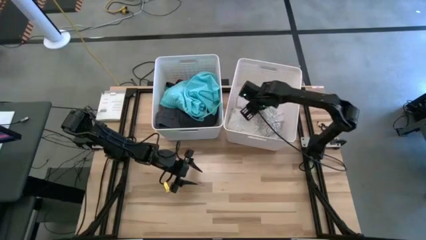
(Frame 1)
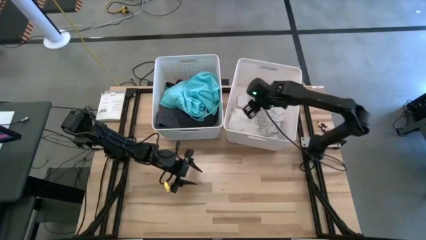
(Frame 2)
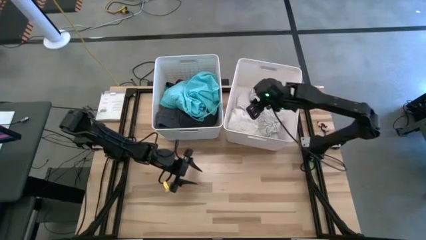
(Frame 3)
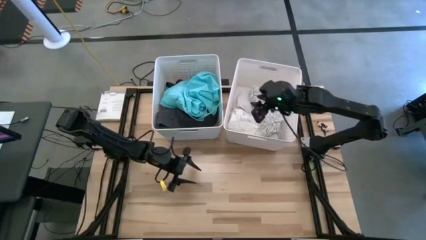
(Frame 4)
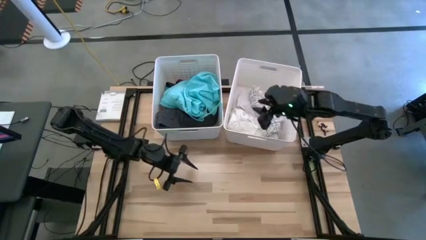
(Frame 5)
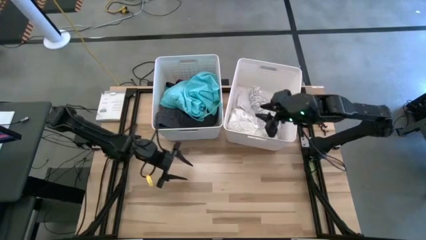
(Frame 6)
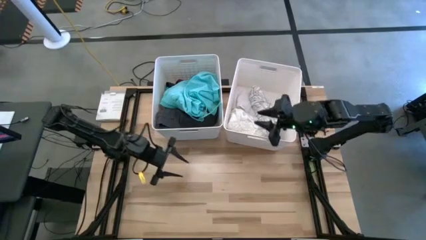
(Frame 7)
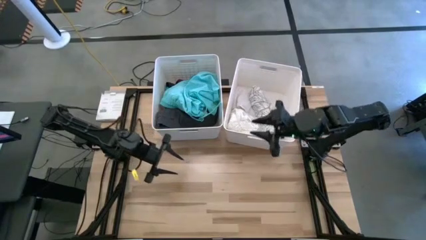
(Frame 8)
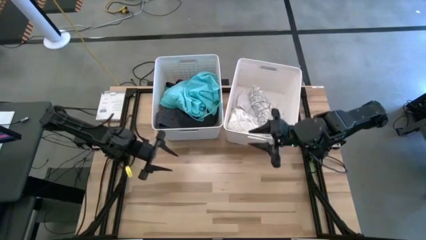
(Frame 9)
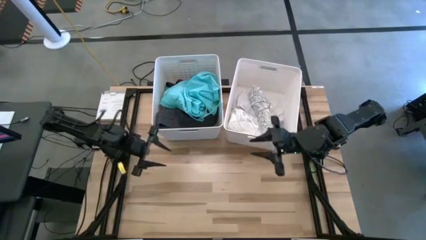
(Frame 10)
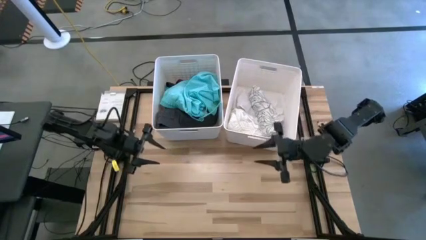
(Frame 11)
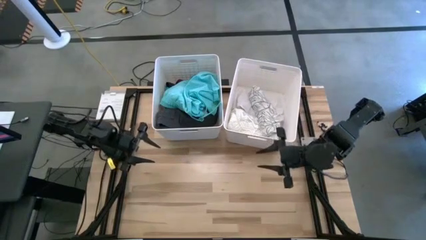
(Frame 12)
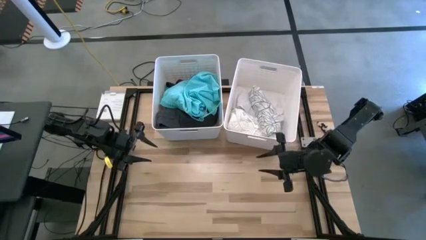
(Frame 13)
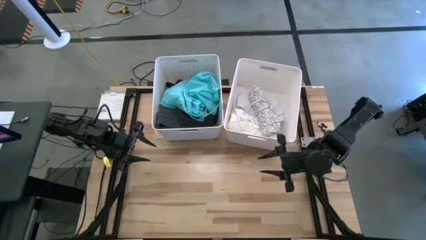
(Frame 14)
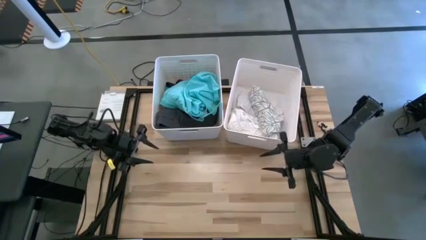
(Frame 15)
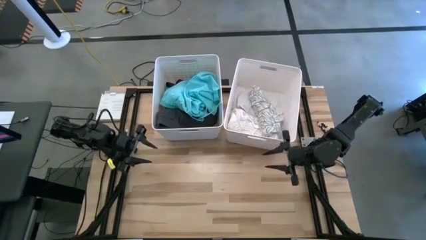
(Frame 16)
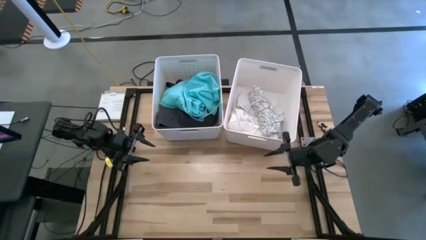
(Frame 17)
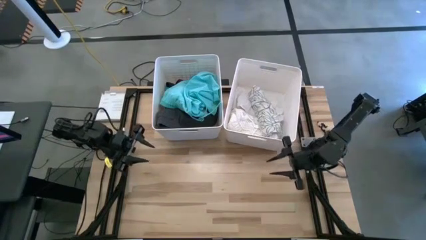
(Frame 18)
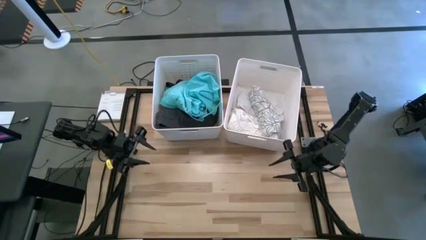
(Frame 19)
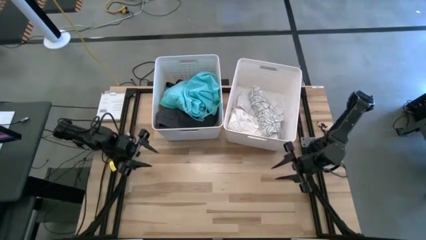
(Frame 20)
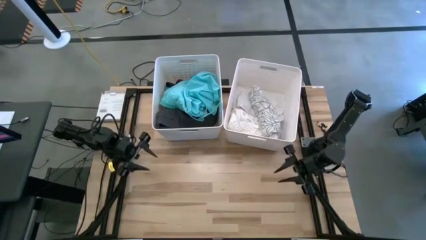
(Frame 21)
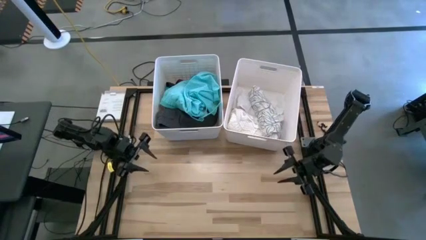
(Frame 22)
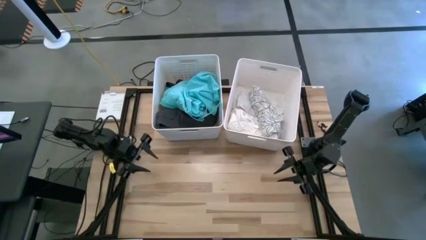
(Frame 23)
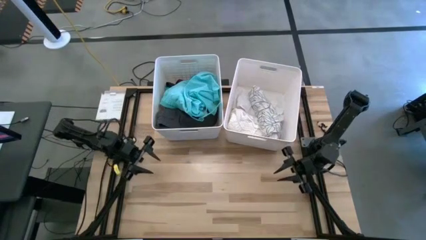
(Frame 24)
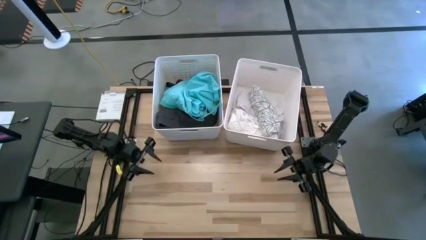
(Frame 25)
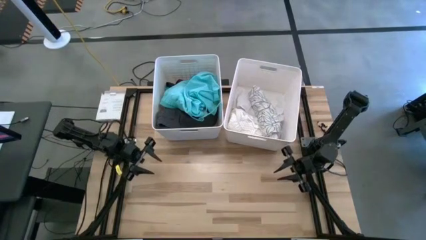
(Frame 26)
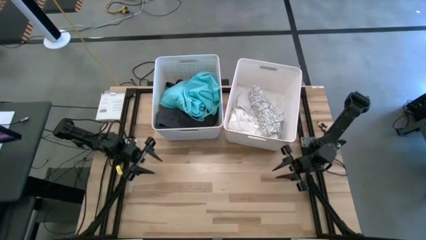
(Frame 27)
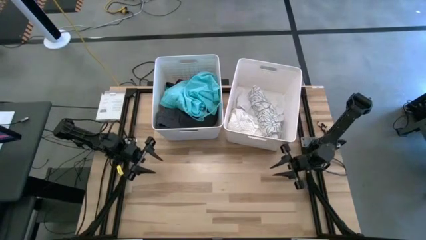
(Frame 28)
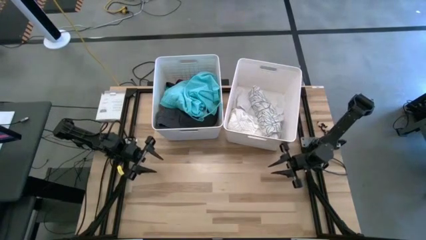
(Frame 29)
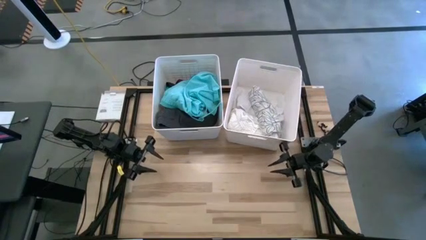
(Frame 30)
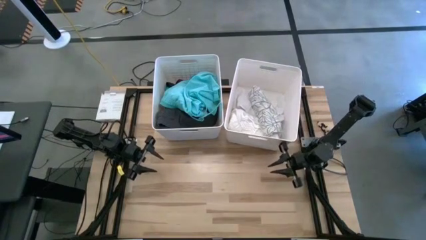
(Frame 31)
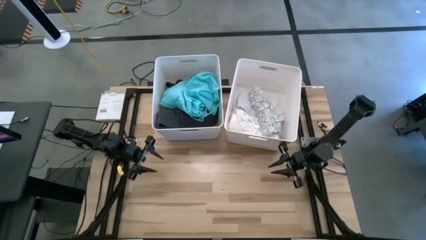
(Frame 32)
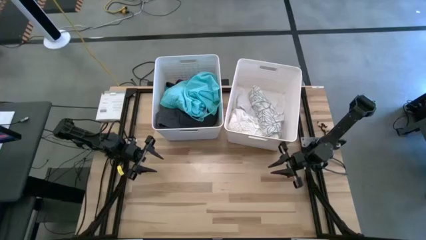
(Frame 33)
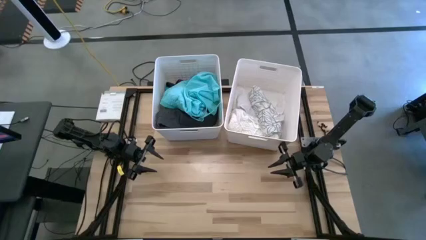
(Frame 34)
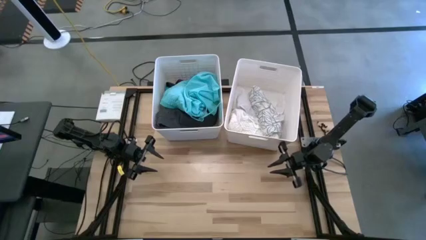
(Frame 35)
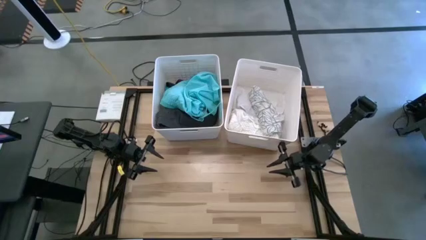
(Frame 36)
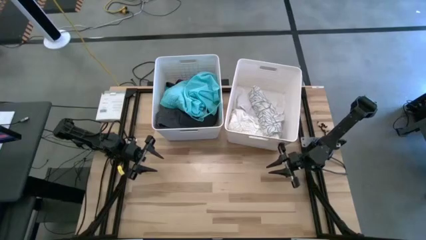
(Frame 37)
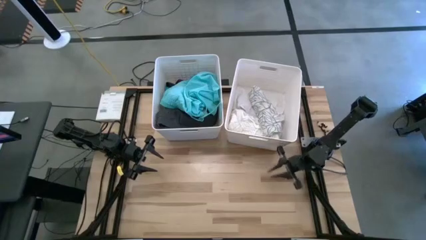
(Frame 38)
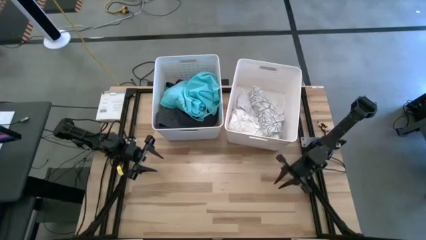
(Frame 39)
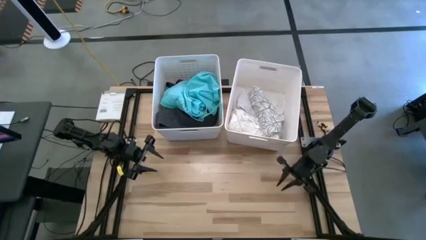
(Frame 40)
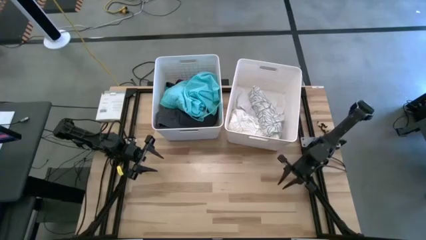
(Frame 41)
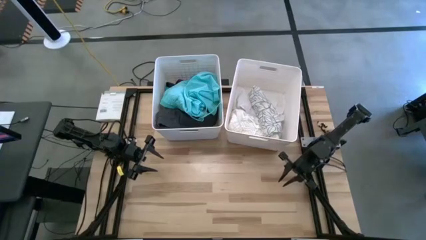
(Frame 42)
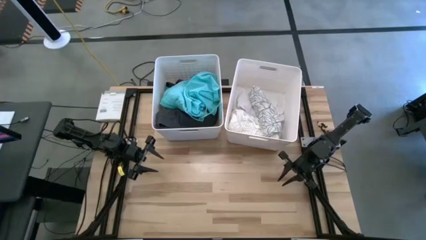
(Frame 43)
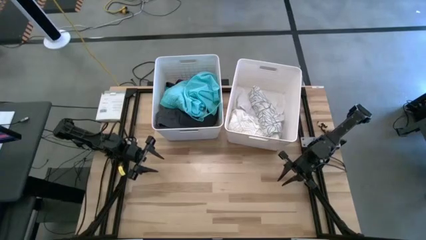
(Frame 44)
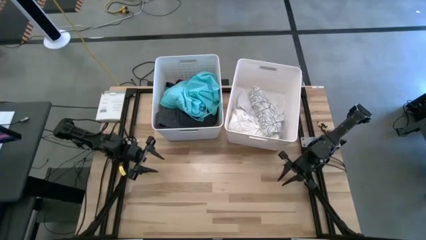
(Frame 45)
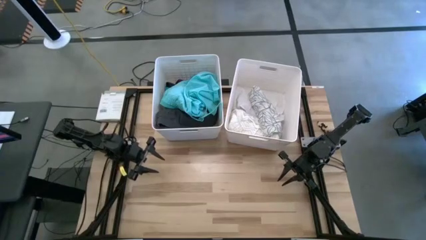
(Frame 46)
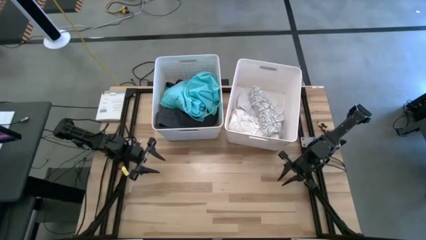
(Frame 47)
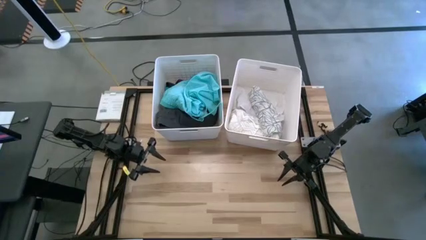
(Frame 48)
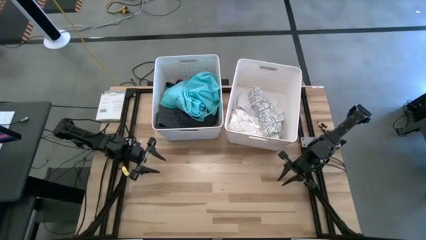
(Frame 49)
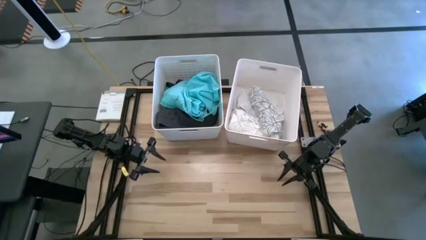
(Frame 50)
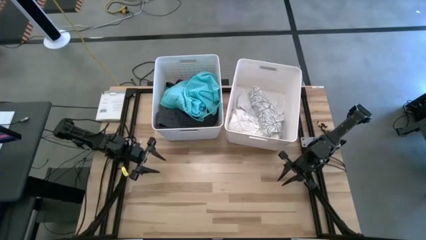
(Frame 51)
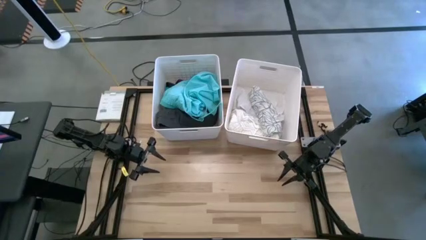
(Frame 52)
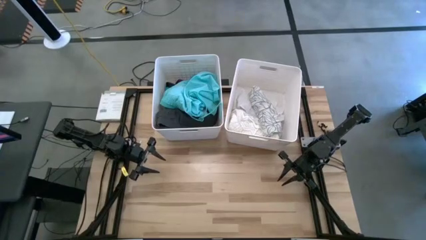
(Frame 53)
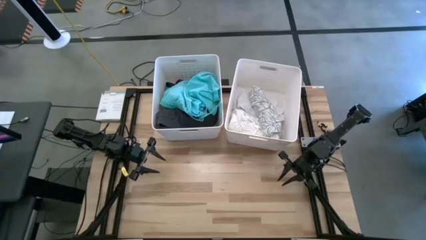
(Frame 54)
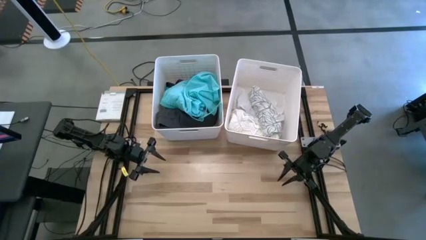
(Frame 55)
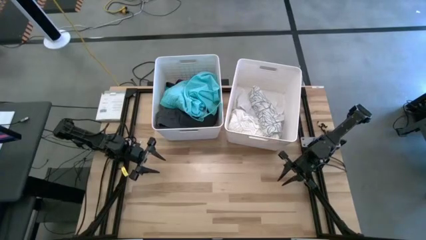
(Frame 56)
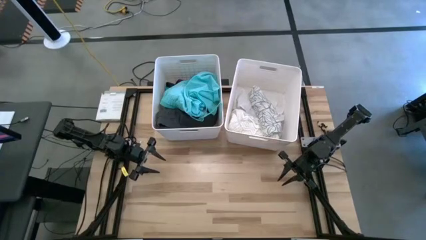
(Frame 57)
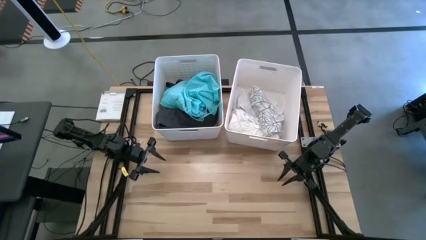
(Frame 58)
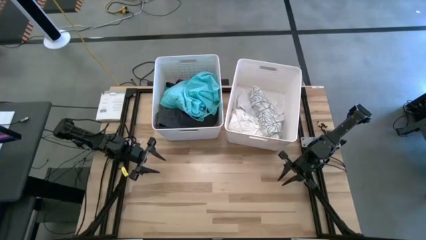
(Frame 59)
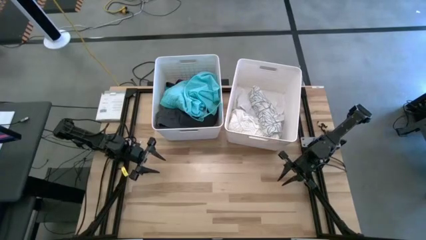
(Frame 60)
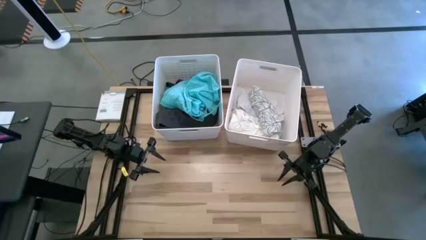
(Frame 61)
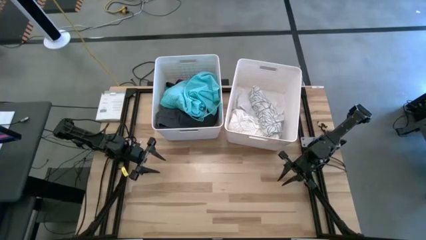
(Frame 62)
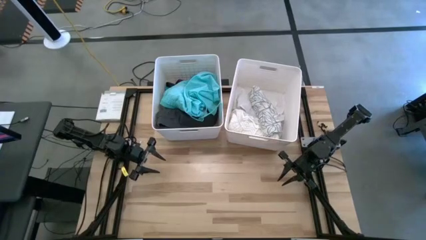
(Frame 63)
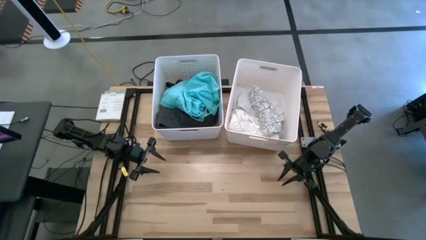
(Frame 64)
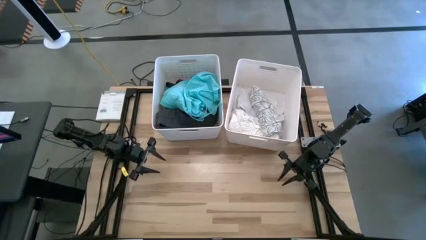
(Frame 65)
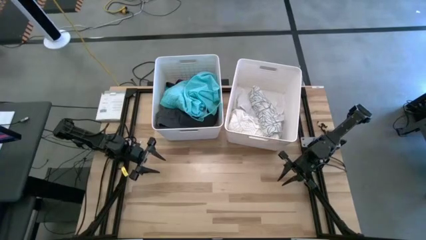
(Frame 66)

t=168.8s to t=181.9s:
Task: Sort clothes
Return to Home Position
